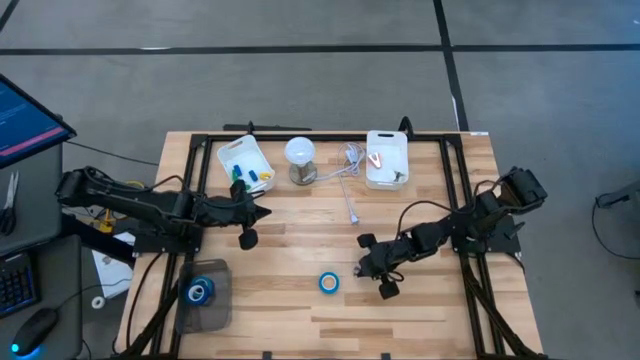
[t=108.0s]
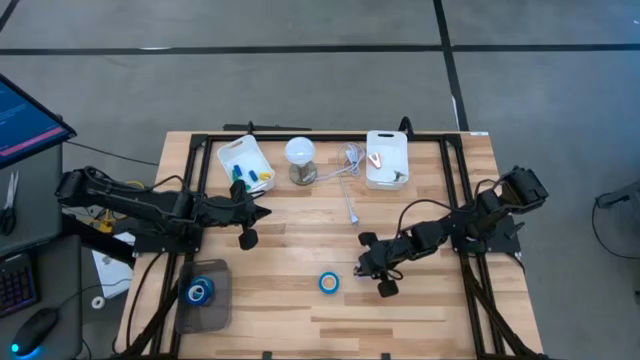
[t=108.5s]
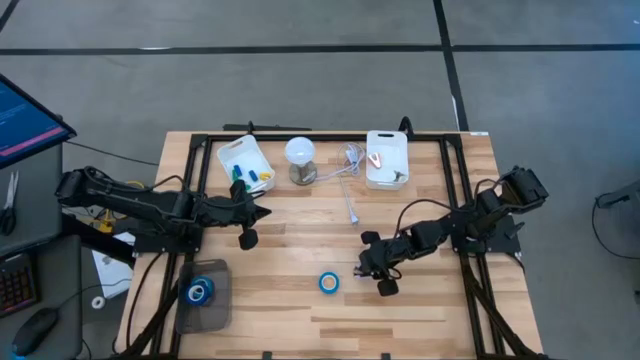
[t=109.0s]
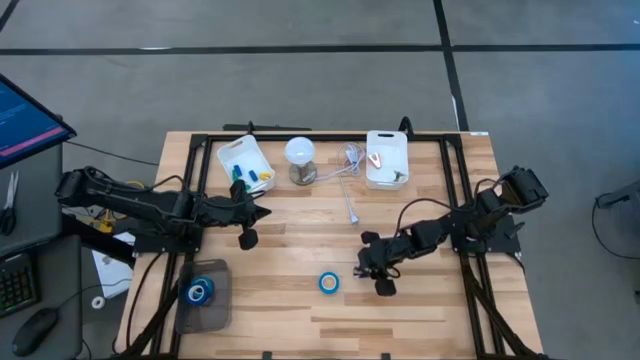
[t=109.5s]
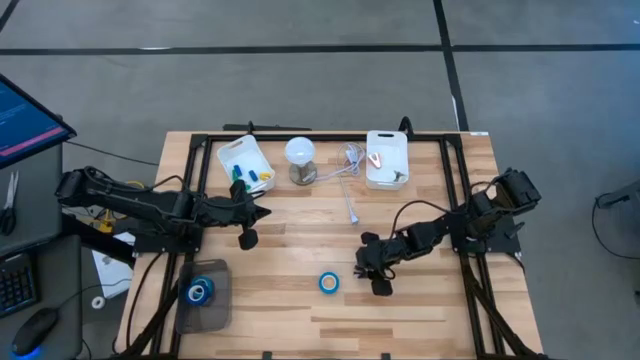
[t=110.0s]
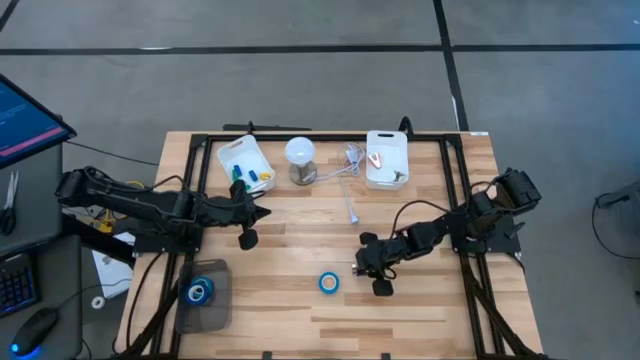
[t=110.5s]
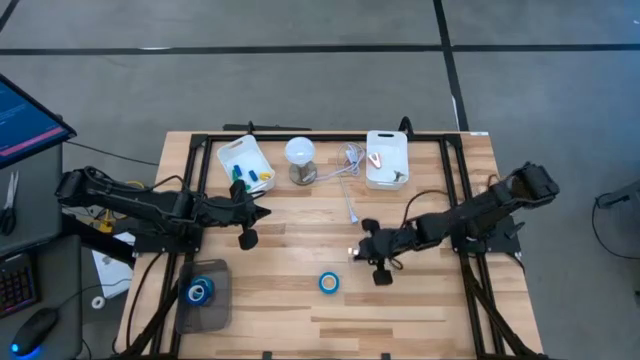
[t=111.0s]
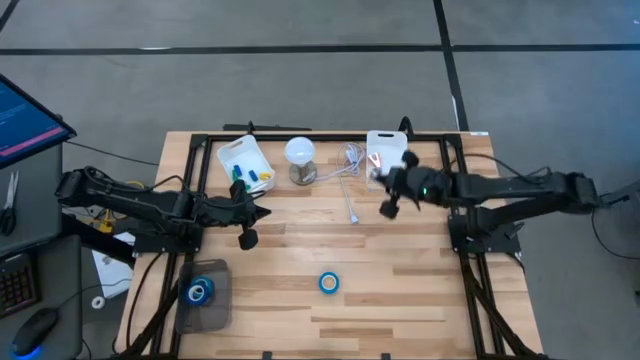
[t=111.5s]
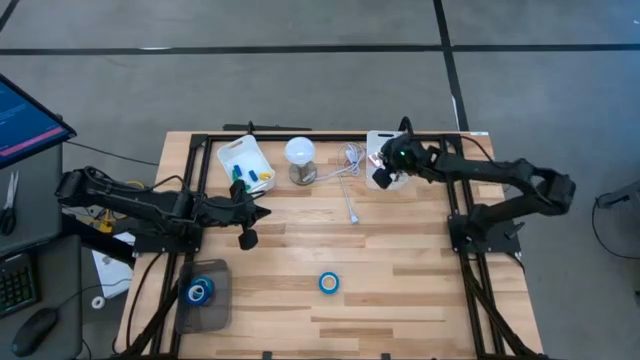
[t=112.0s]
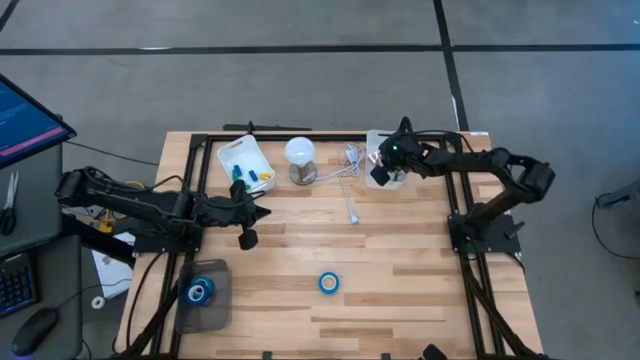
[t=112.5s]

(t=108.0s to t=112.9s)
Task: Pick and place Stapler, Stapler remover, tape
Put the purple staple remover into the right white bin

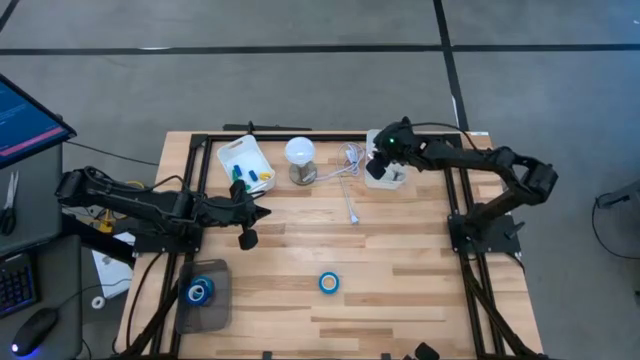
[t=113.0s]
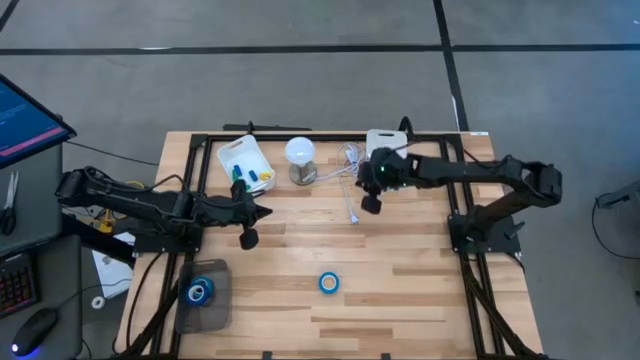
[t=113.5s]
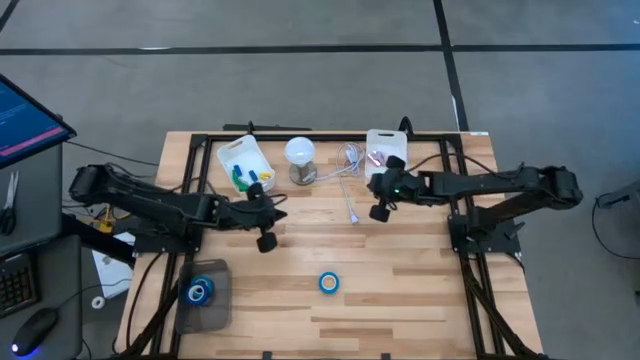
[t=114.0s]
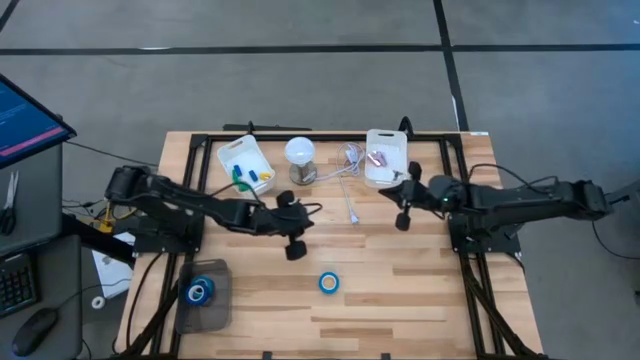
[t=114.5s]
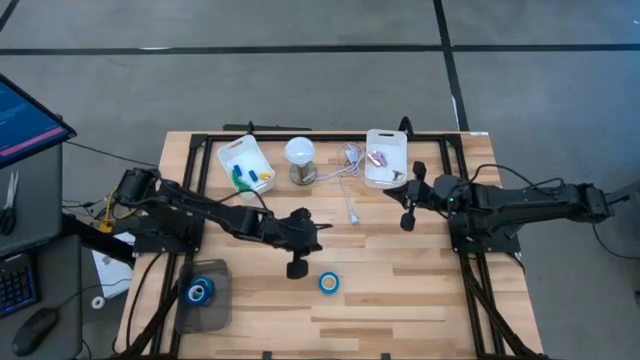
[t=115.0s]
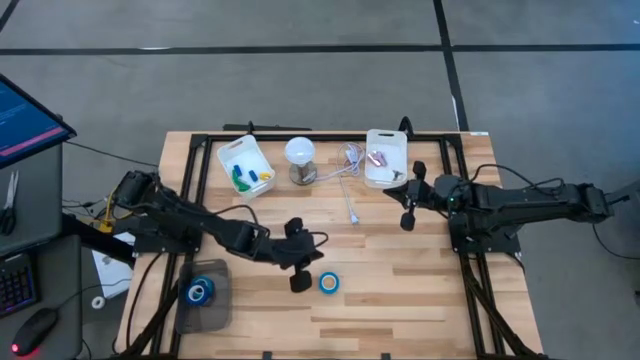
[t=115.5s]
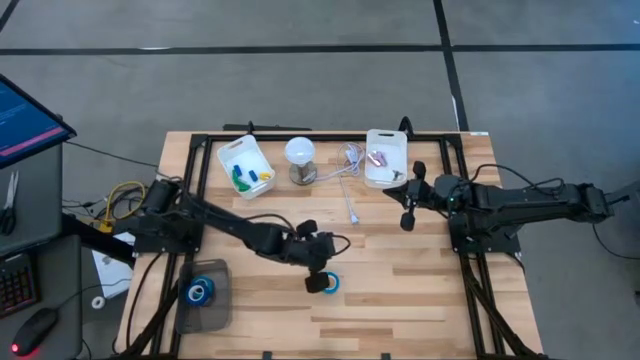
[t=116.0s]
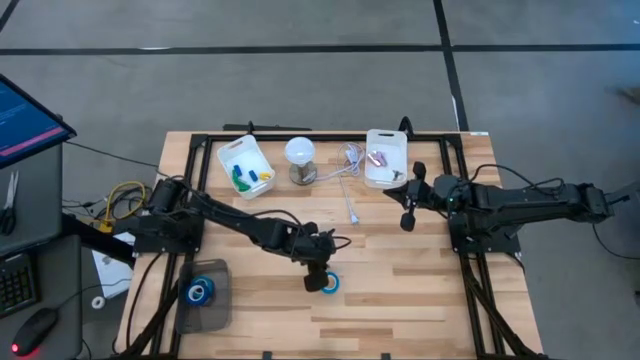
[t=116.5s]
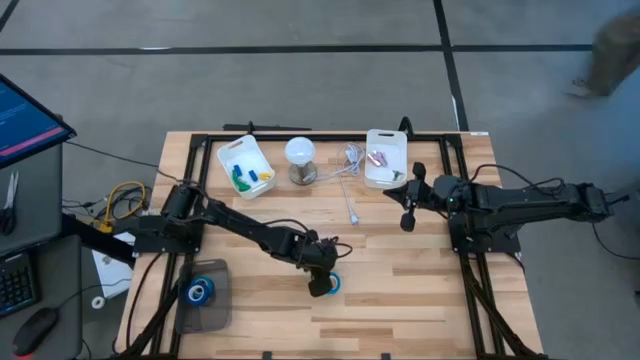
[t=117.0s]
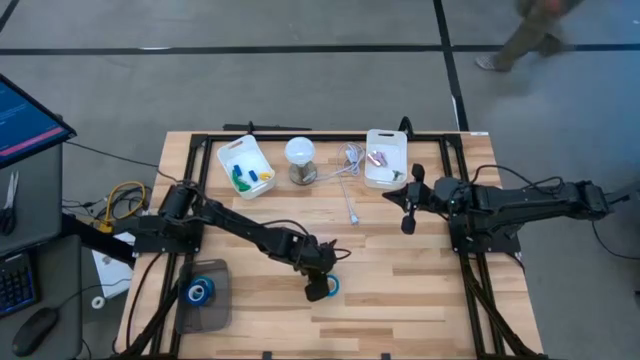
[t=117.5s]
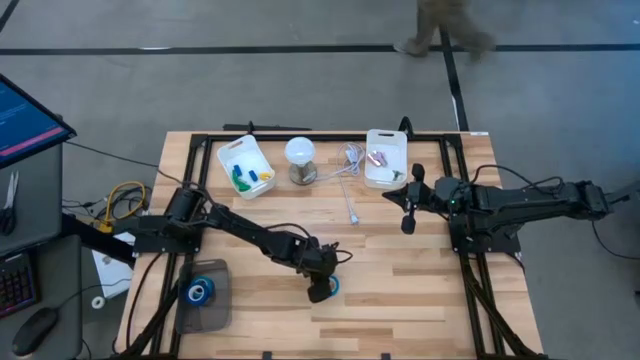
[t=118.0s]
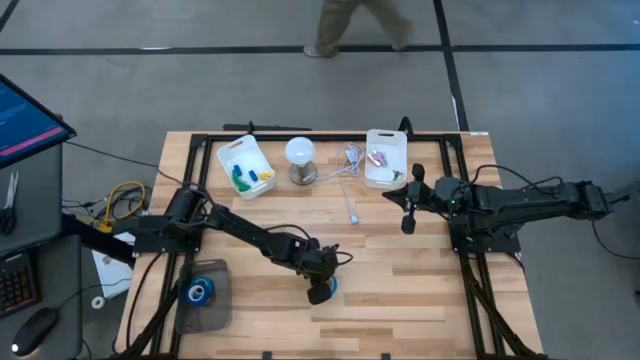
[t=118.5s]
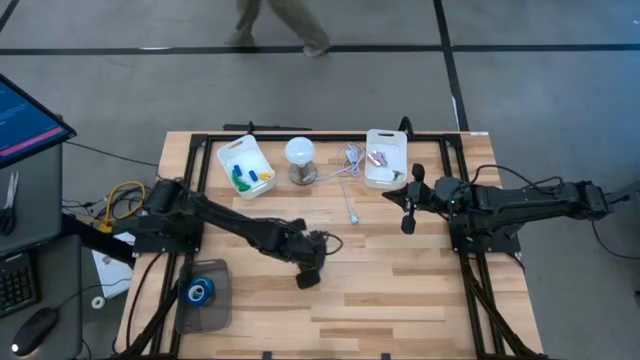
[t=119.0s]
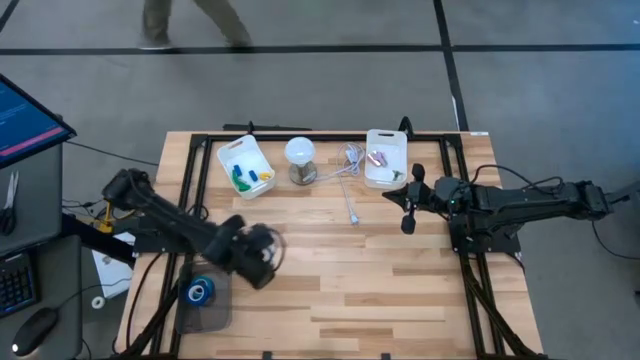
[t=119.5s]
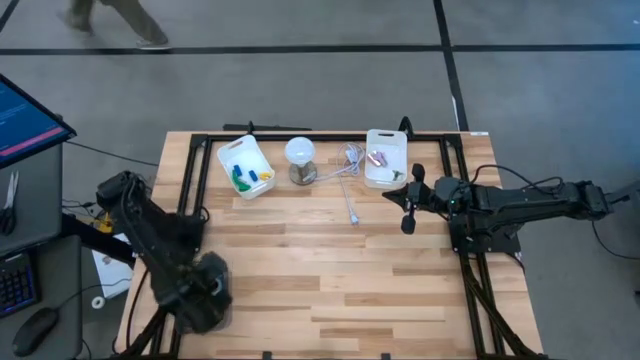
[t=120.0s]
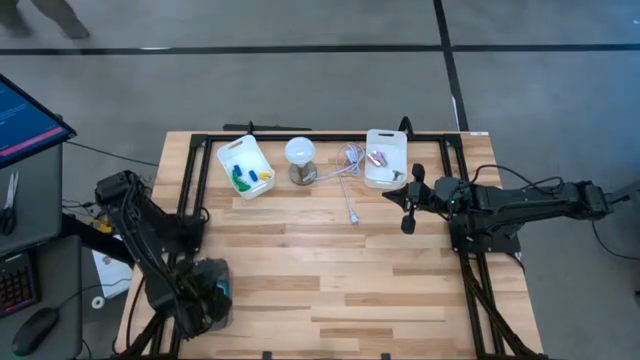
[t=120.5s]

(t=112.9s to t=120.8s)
Put the light blue tape into the black bin

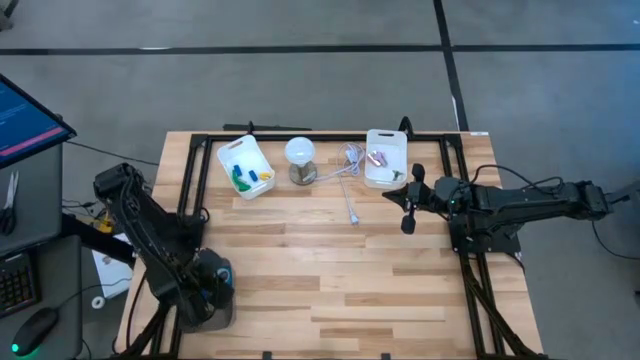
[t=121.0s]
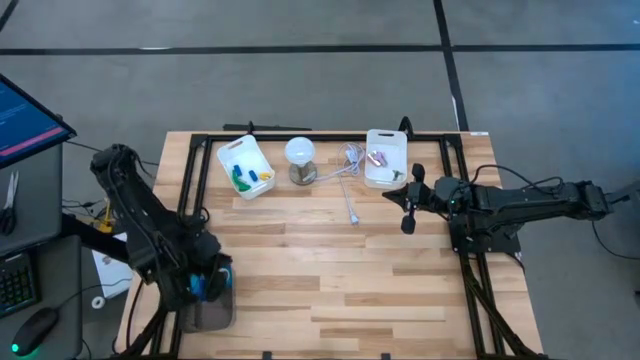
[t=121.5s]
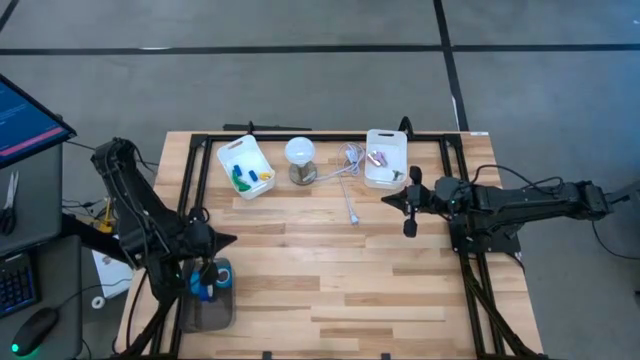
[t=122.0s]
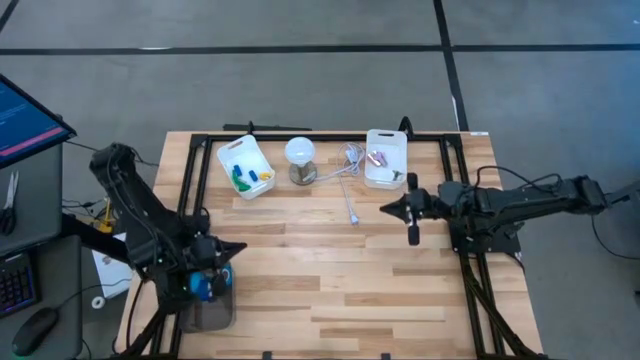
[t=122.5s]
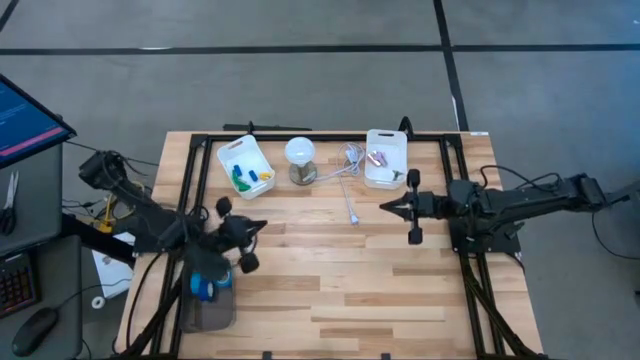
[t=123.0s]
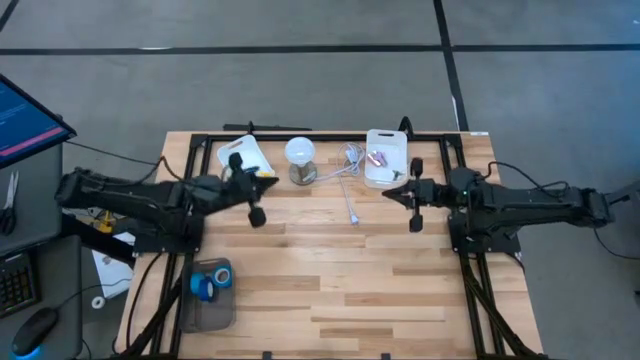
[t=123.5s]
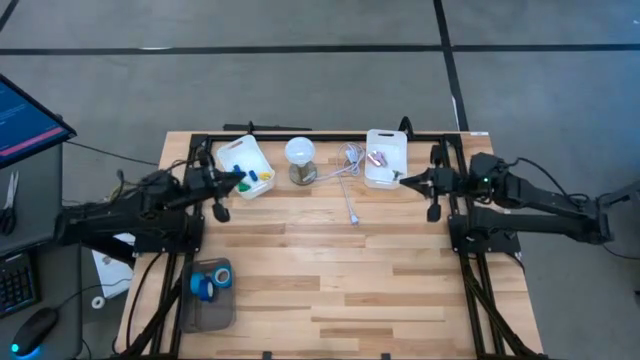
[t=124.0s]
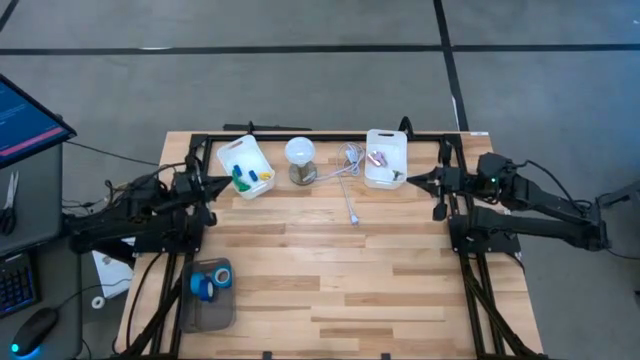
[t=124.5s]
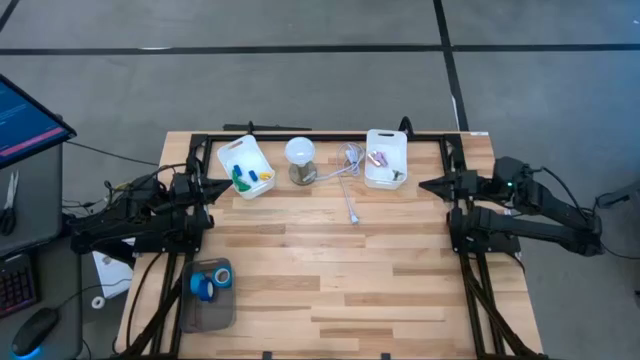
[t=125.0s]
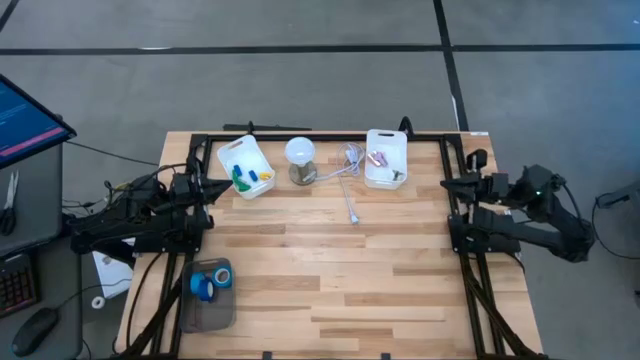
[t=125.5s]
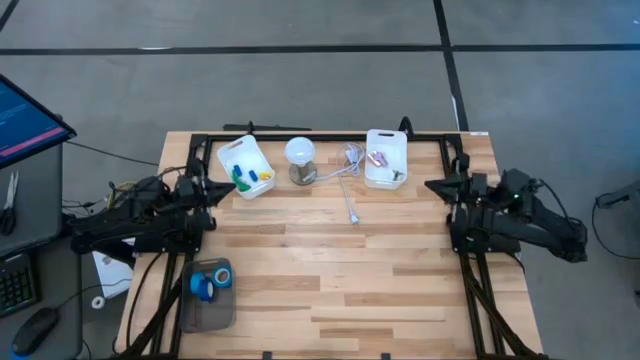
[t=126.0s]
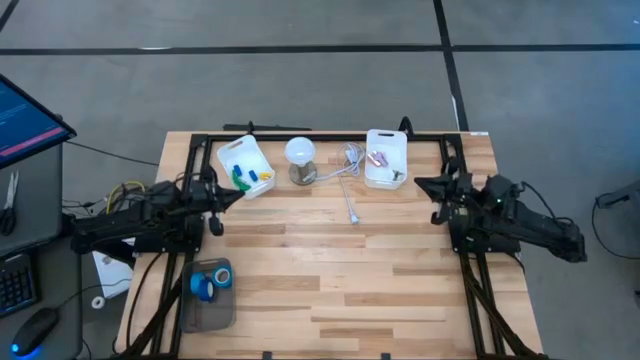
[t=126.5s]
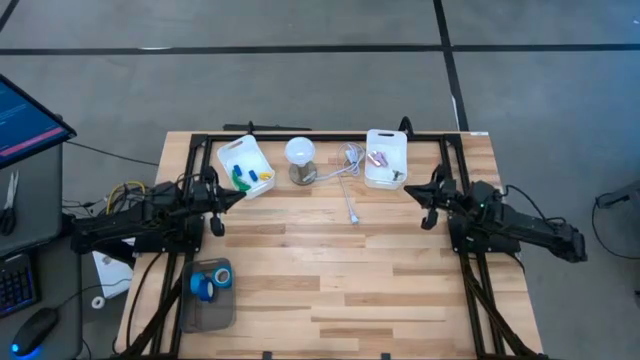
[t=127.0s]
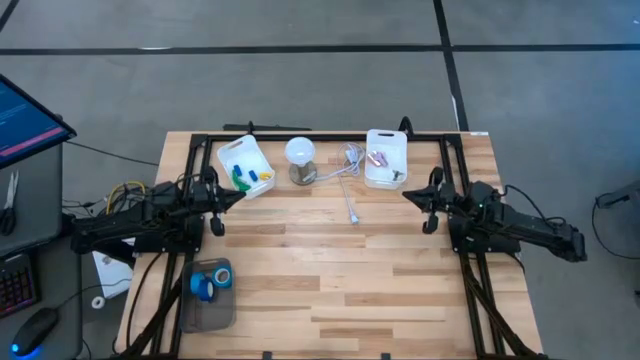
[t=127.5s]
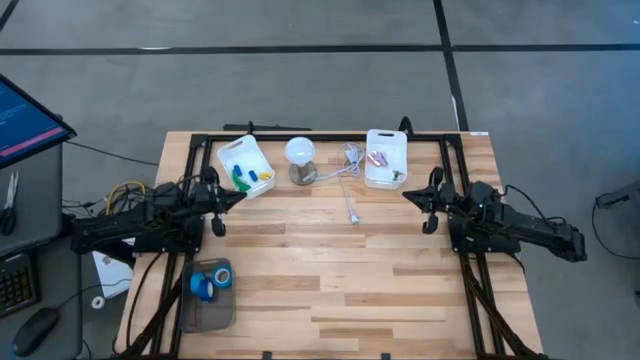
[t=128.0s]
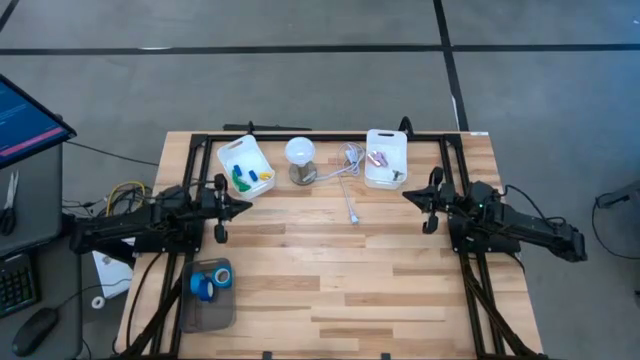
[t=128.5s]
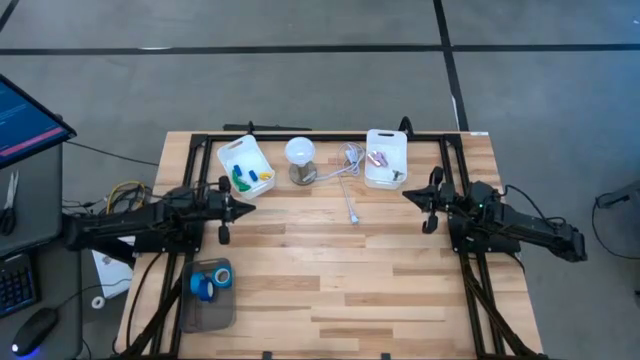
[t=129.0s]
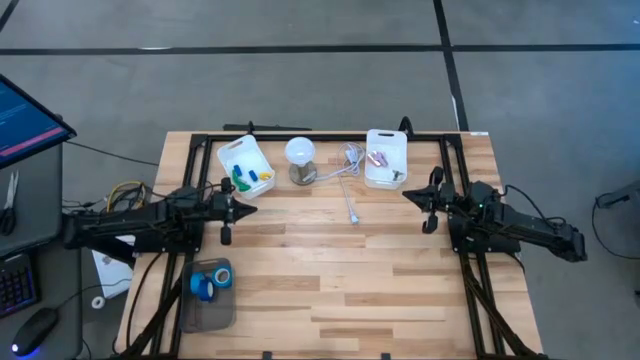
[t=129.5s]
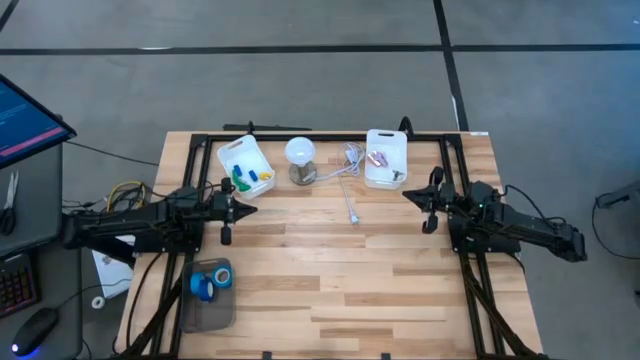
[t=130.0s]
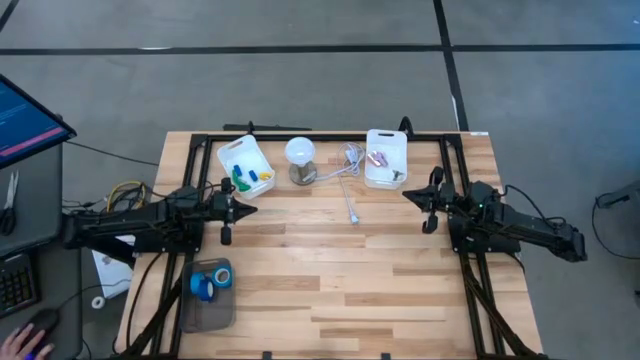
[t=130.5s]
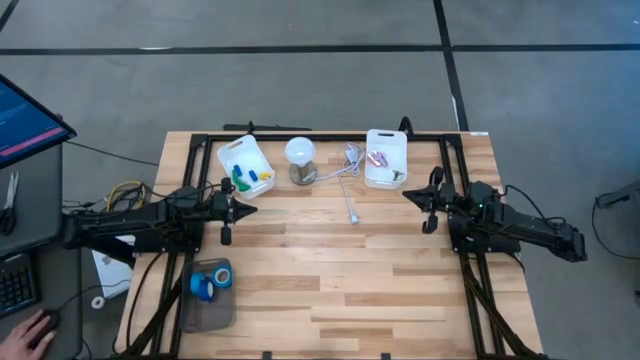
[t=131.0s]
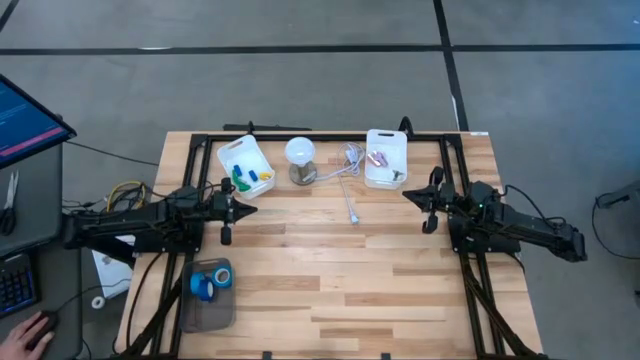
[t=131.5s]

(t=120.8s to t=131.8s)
Return to Home Position
